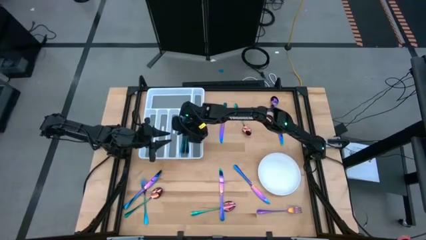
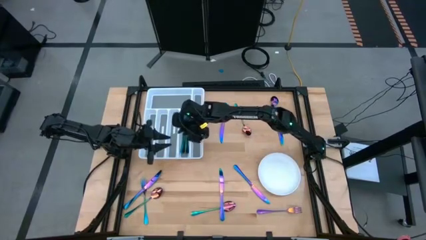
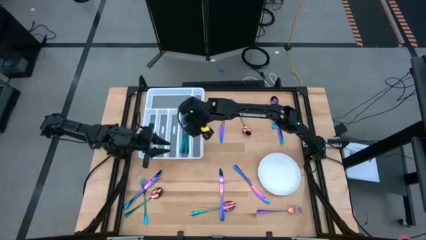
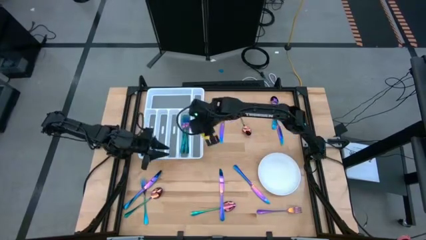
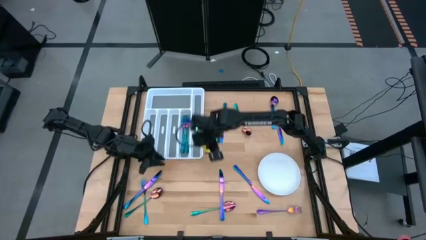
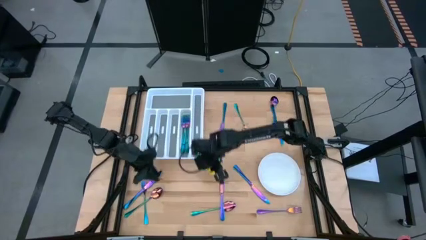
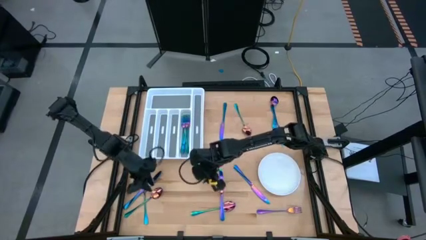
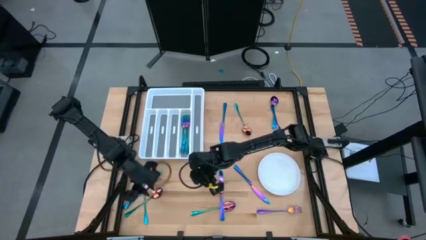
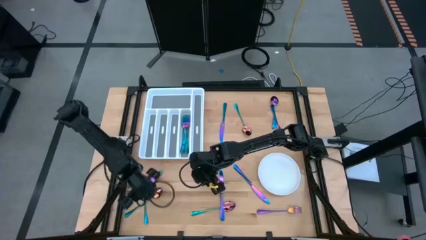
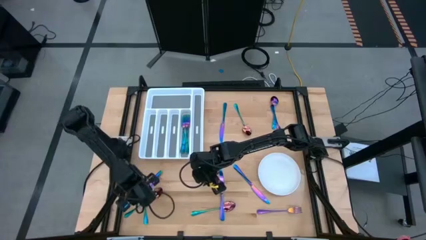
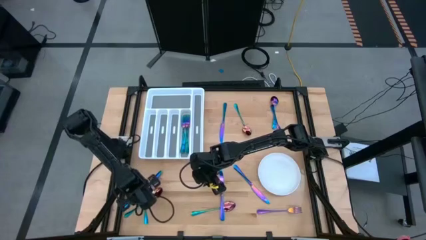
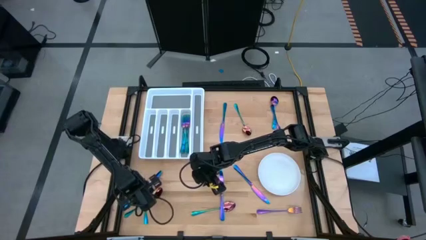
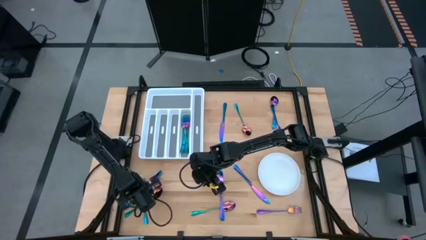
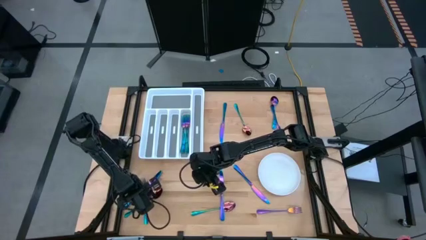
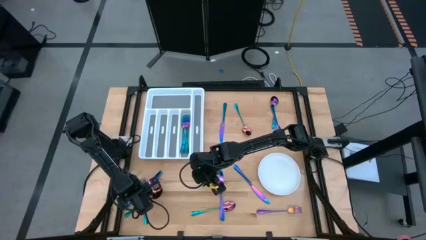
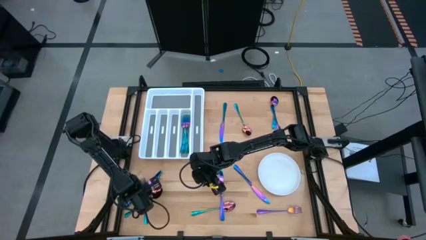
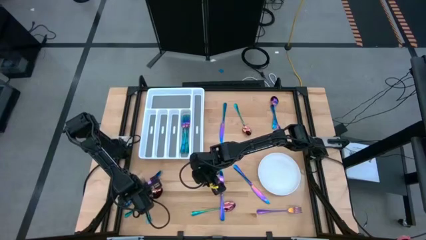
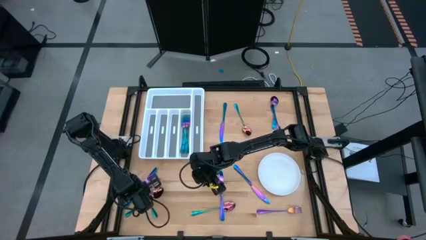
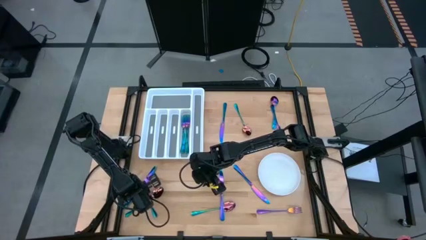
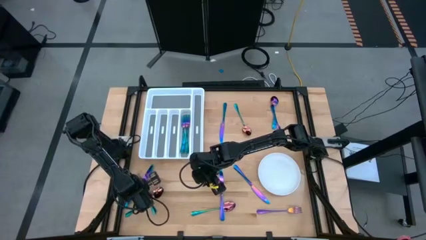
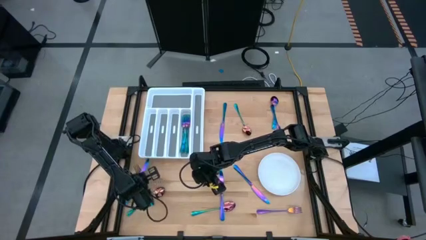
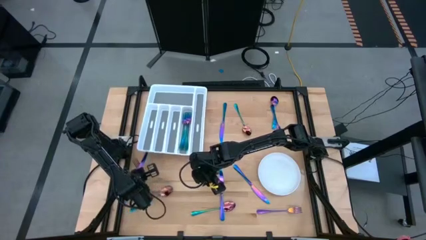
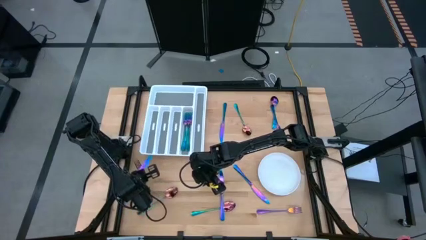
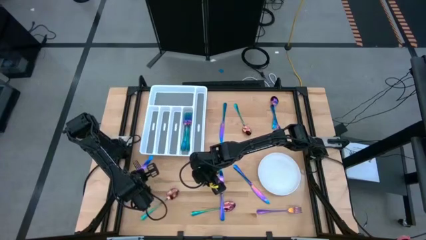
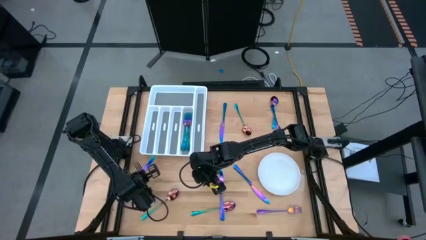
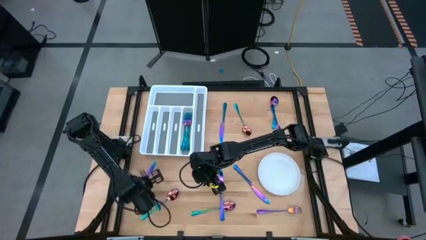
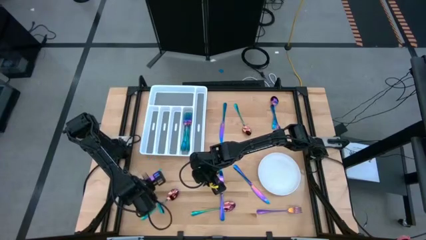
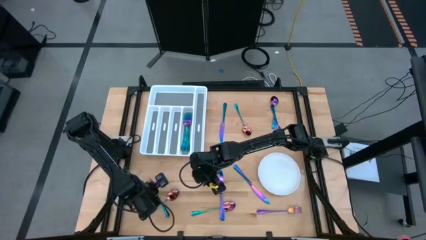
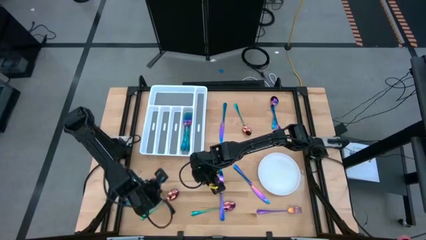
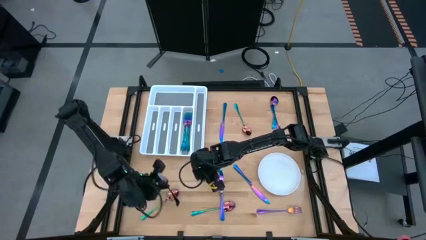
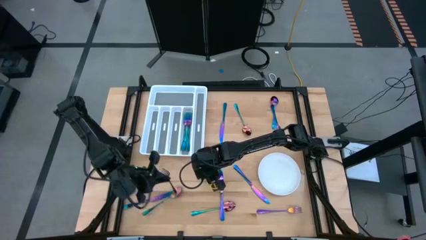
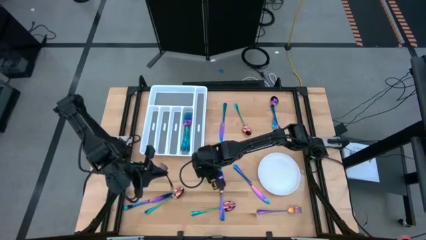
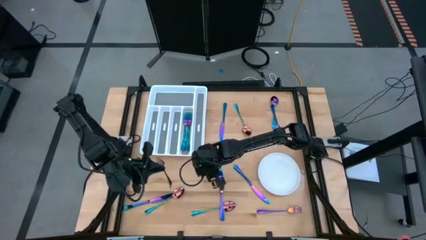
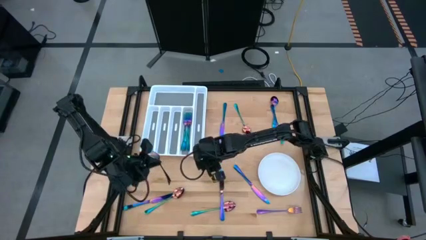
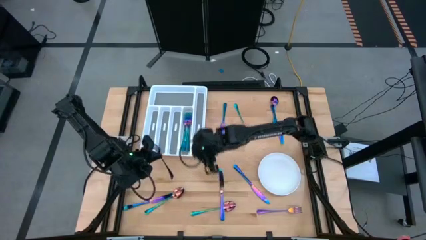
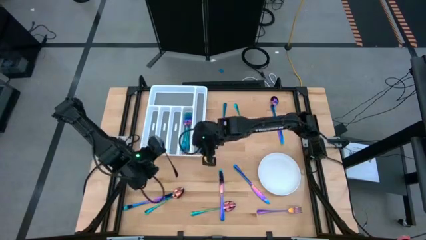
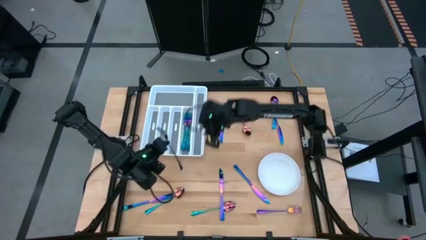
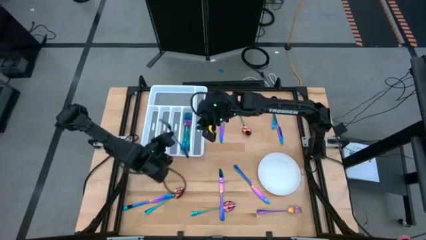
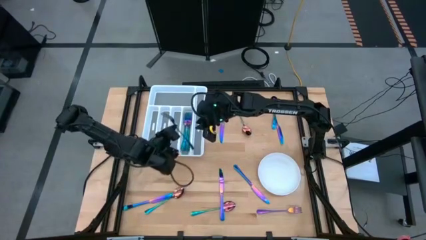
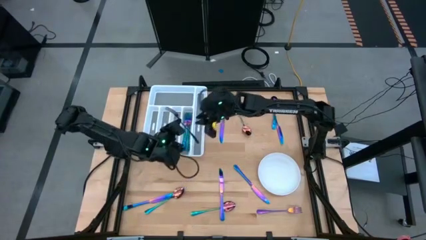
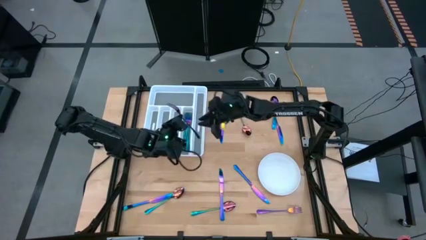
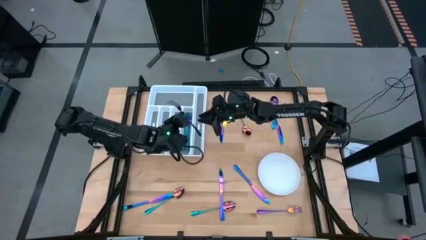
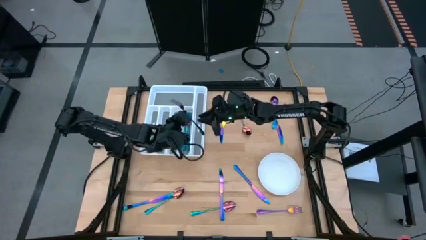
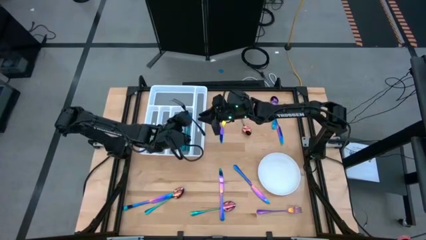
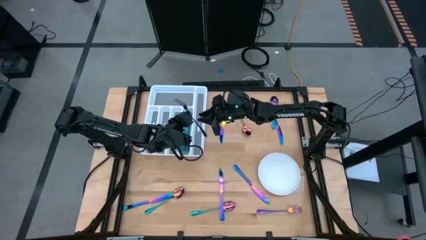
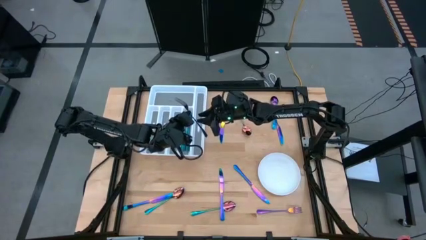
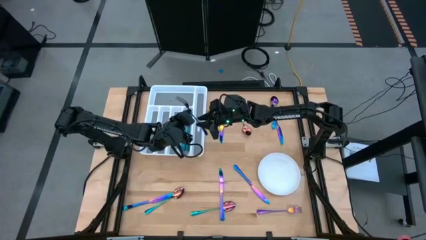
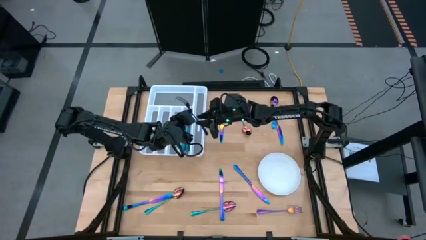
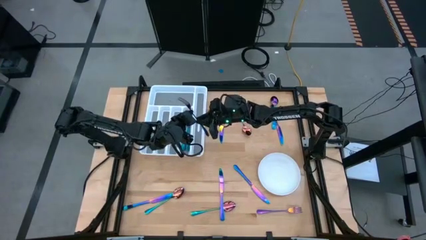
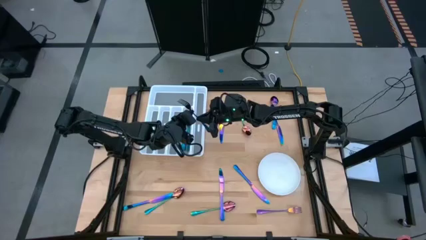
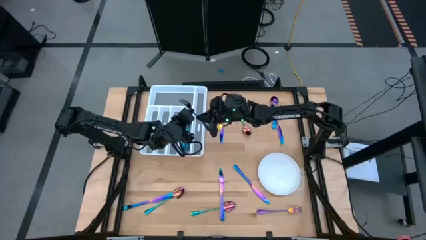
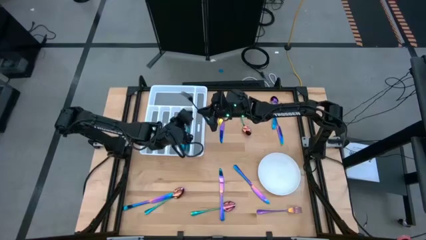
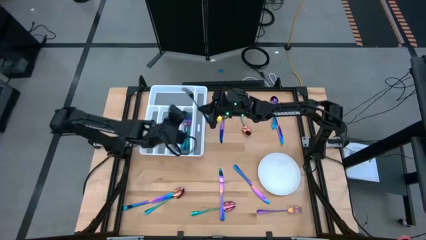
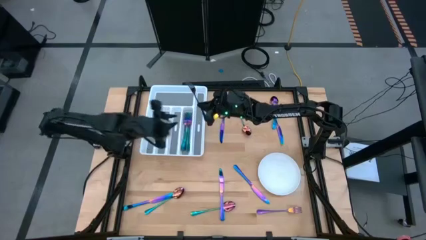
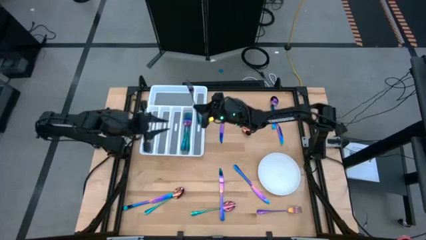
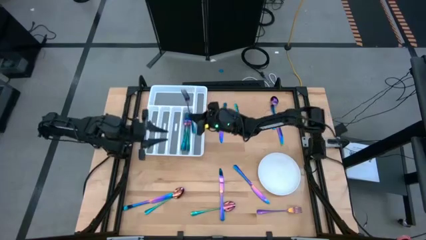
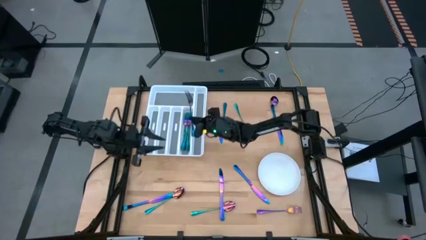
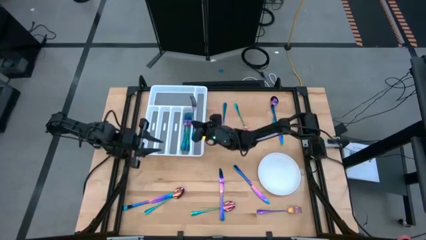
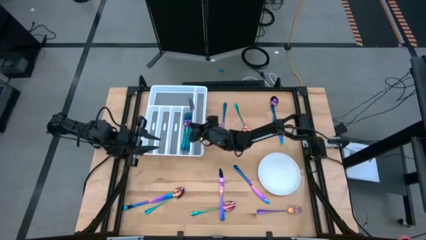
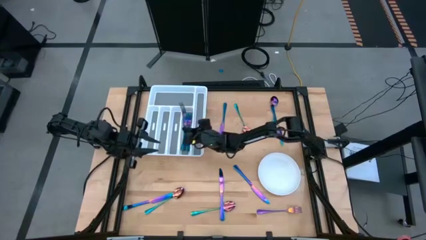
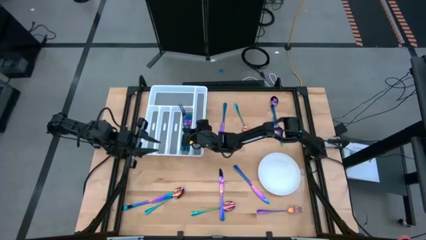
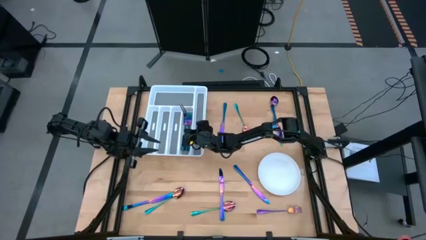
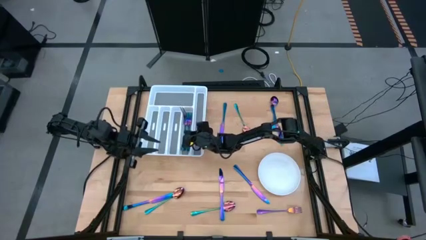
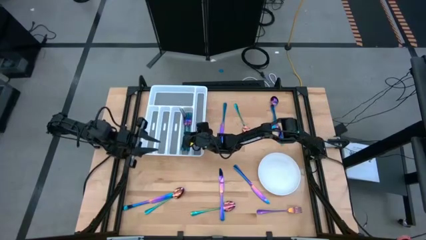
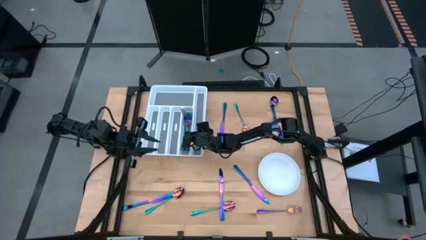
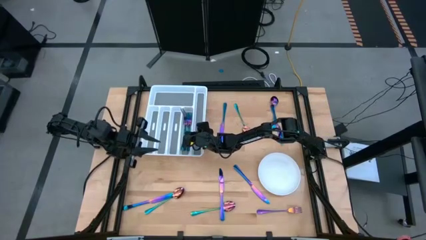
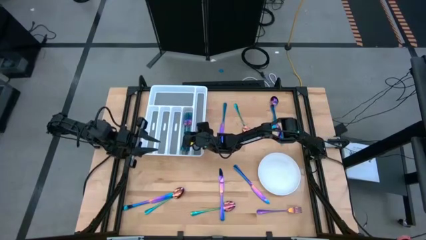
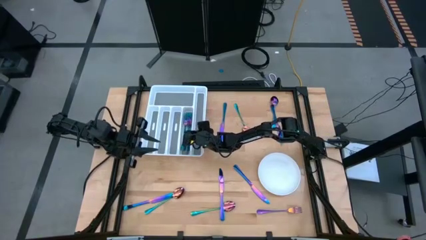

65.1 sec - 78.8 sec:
Task: Sort silverware
Put the iridescent fork into the white silverware tray

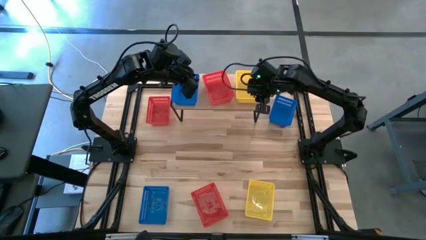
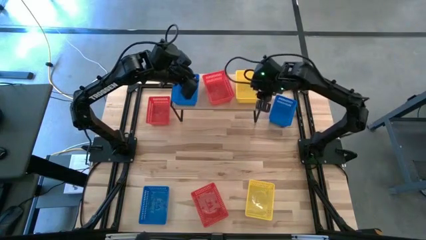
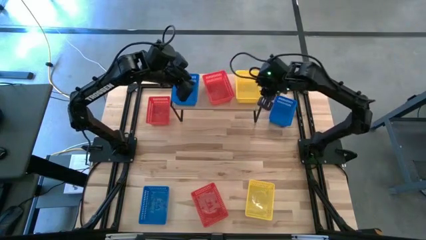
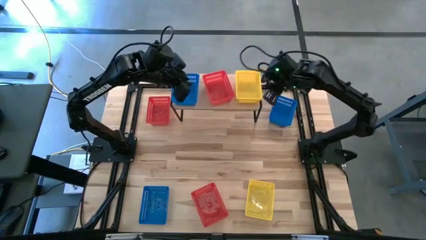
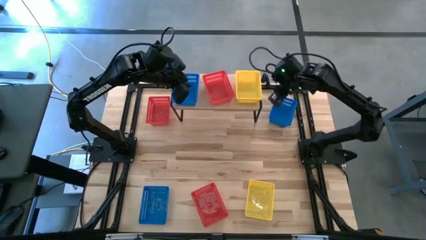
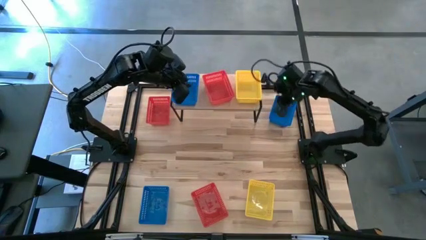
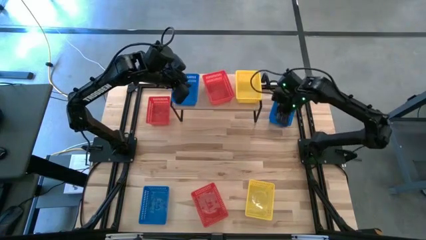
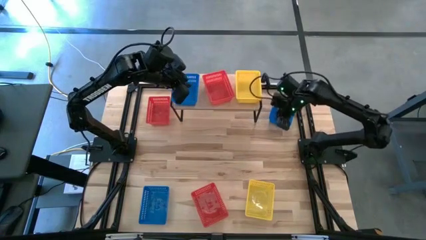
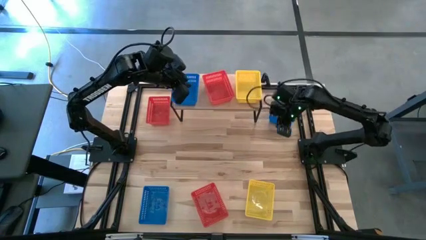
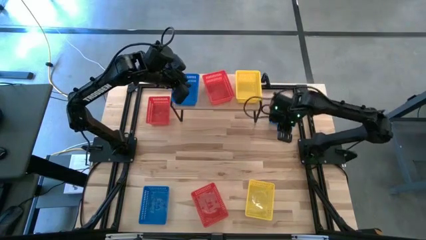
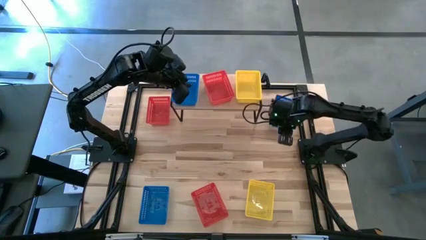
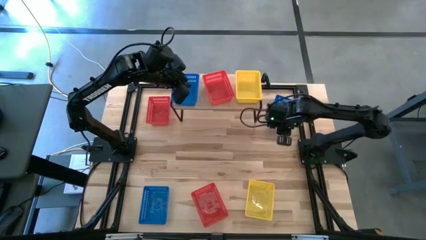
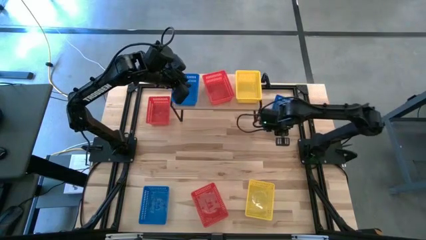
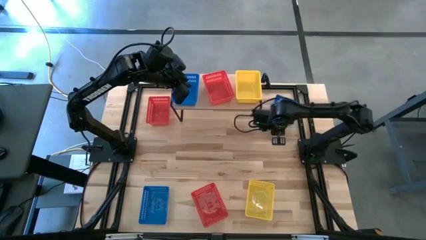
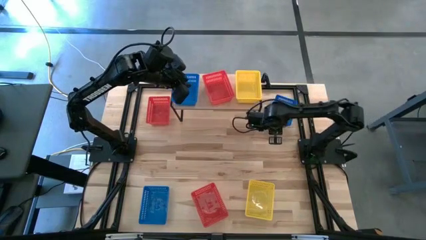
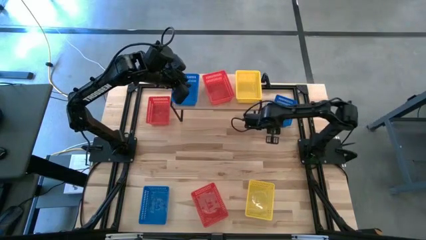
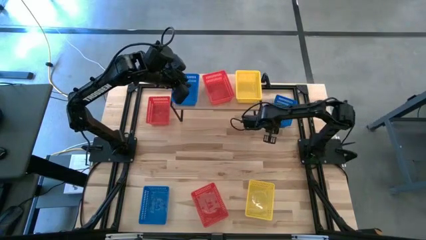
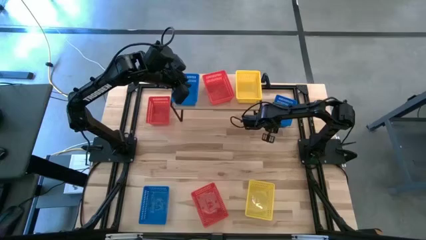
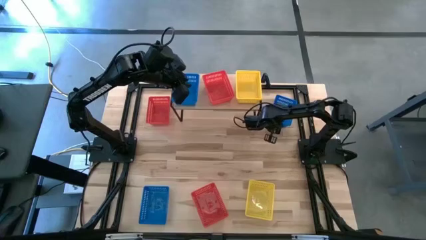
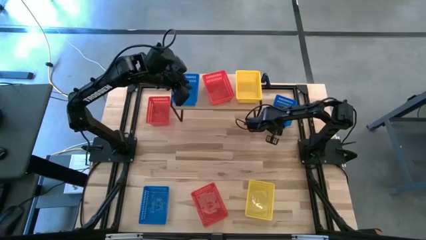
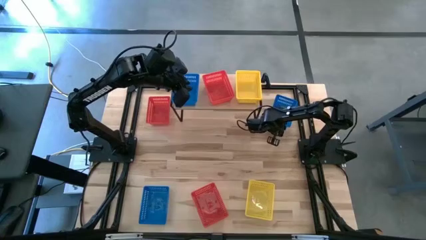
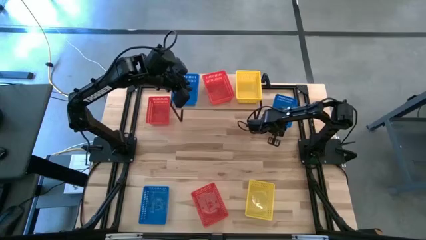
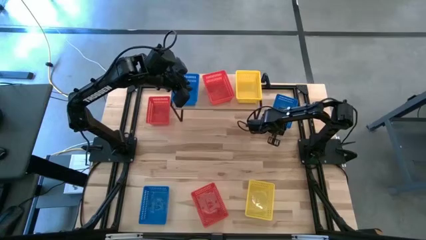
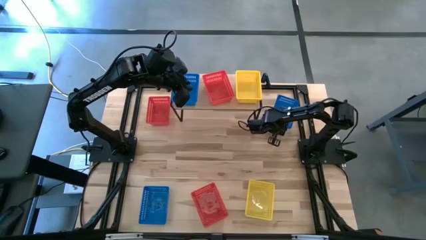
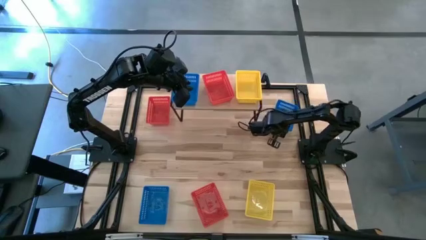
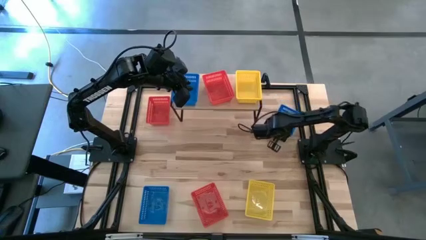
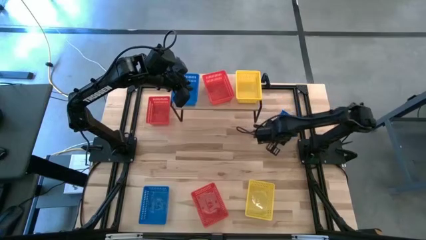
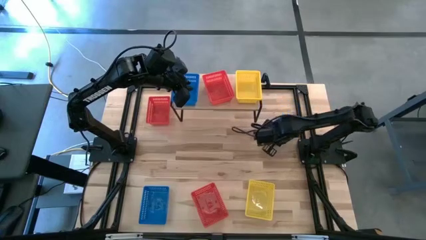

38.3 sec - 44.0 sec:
Task: Stack baskets on shelf by color
Stack the top blue basket into the other blue basket on the shelf
